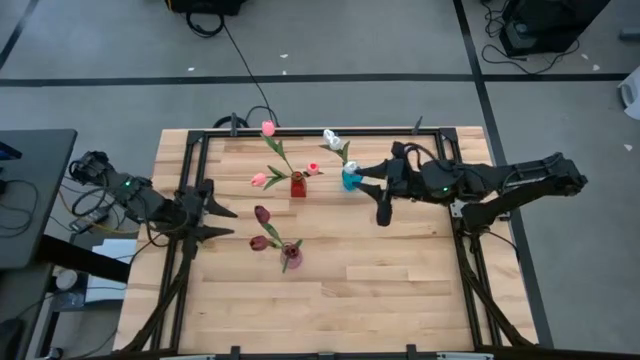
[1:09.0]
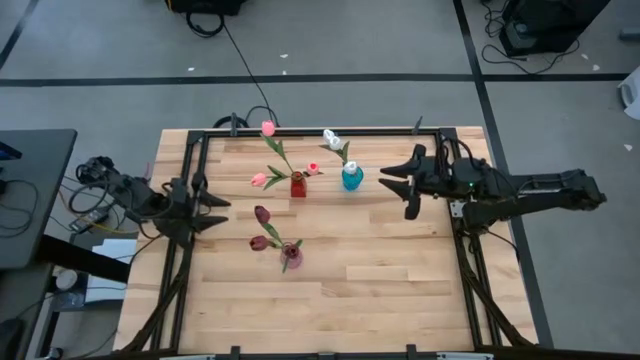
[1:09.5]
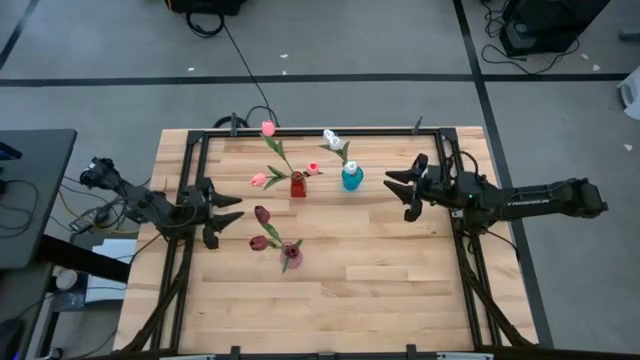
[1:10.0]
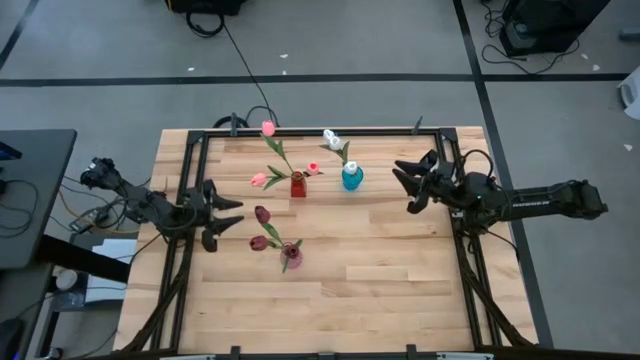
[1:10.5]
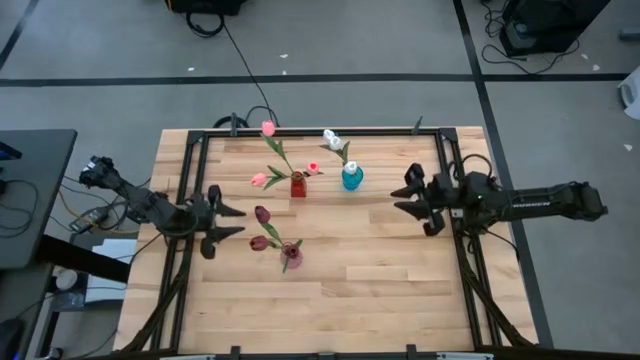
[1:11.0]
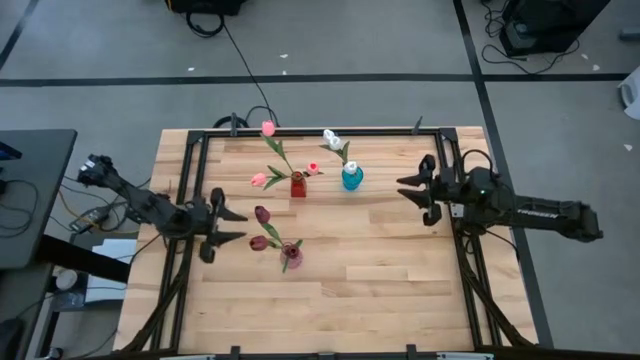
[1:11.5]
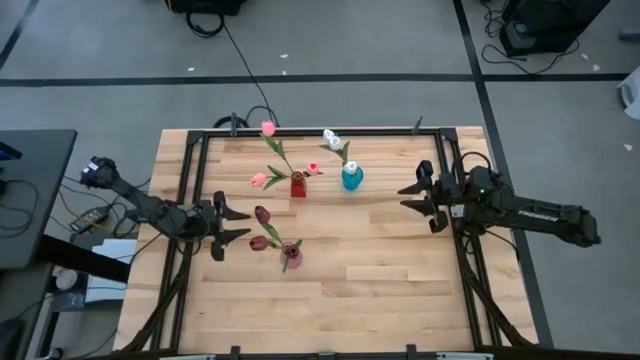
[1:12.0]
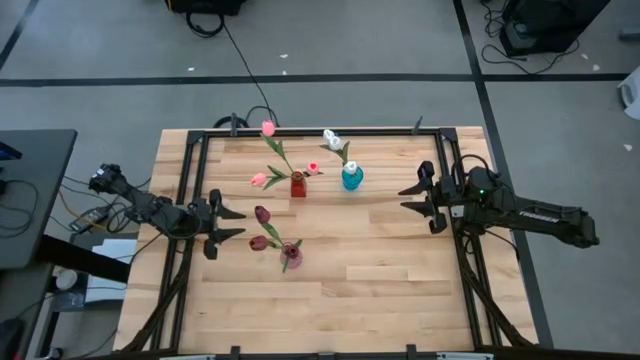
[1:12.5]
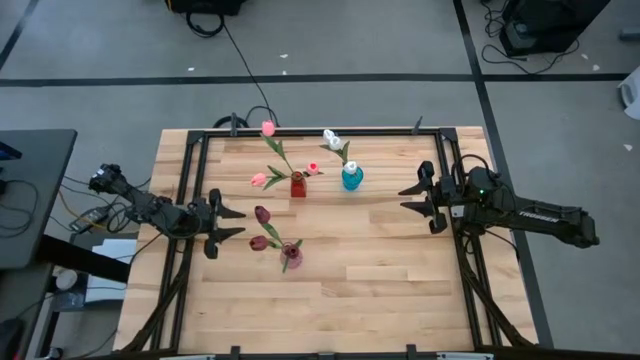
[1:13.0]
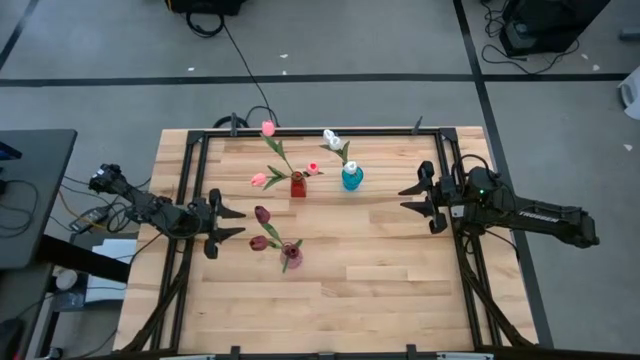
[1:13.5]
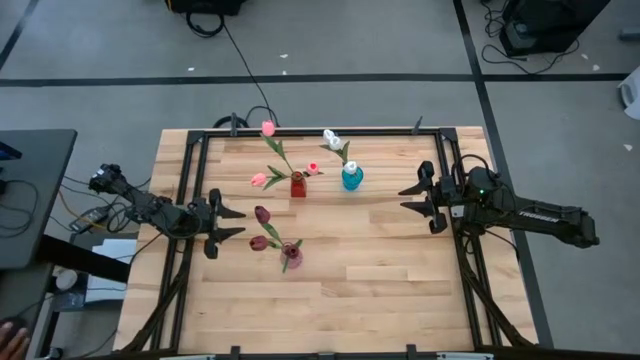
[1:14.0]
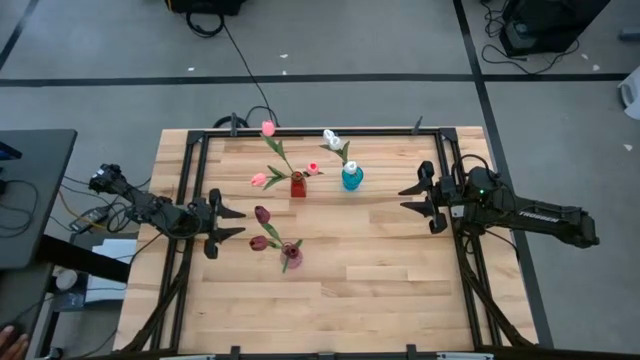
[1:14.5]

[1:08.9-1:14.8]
Task: Sort flowers into vase by color
Return to Home Position

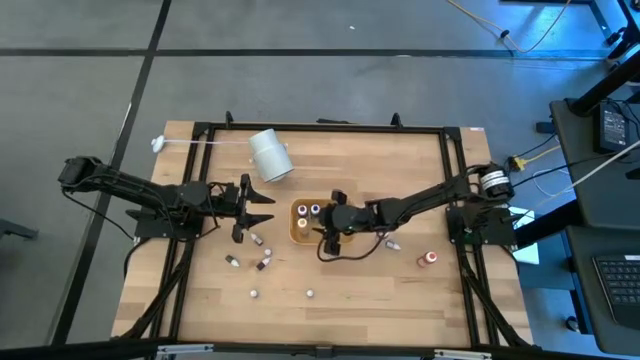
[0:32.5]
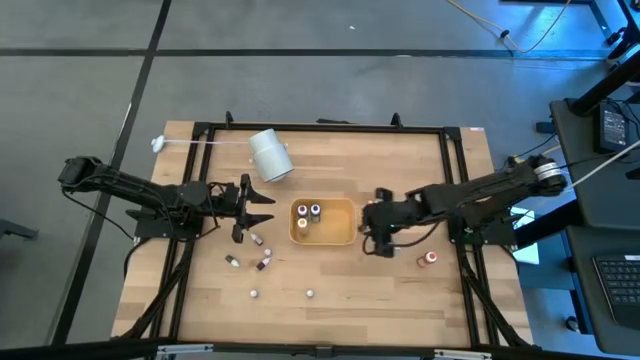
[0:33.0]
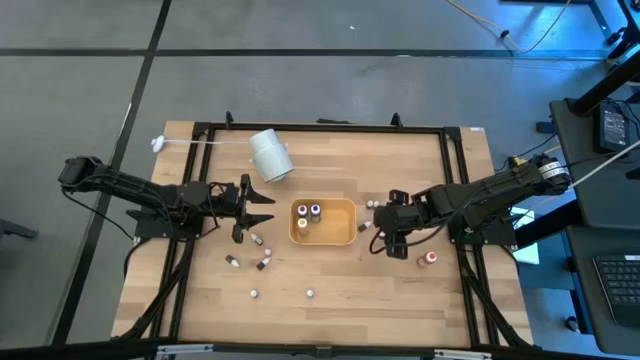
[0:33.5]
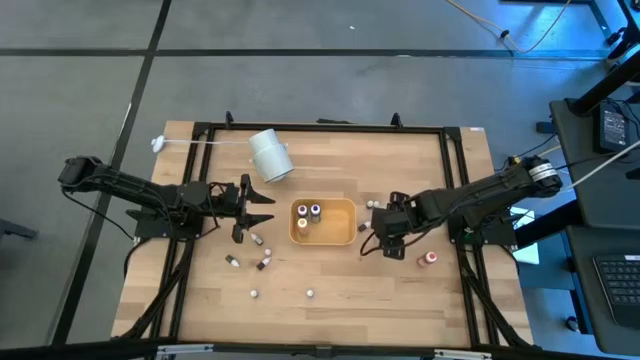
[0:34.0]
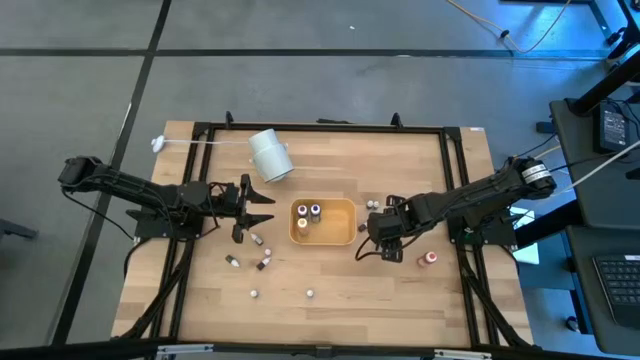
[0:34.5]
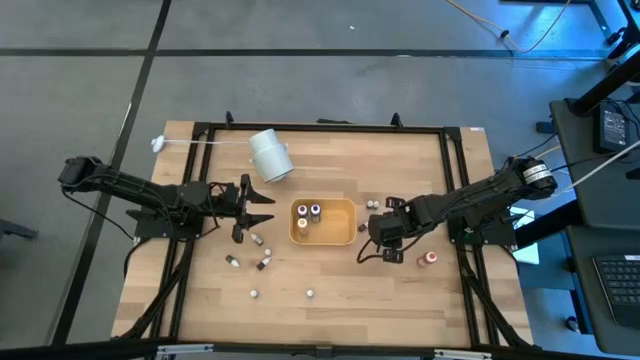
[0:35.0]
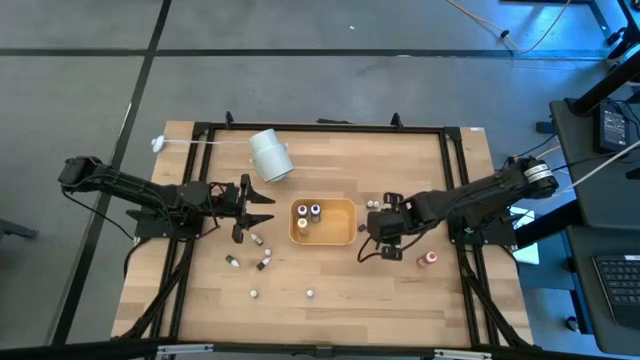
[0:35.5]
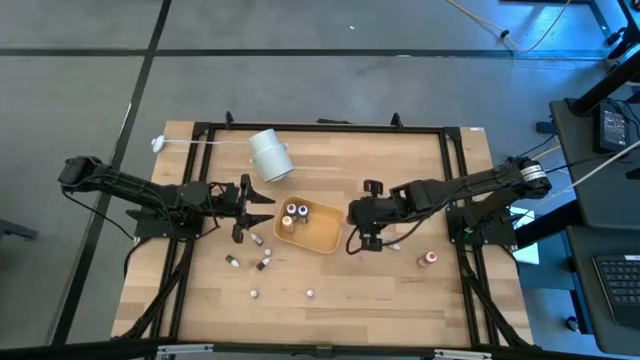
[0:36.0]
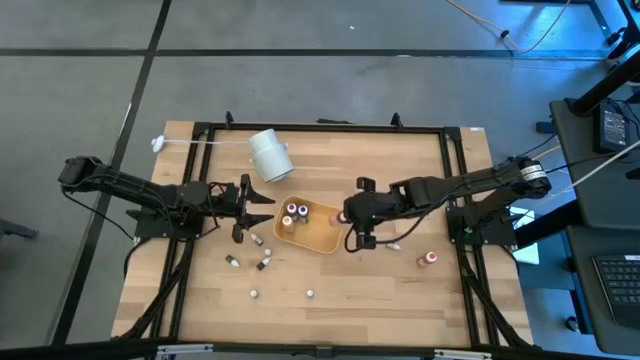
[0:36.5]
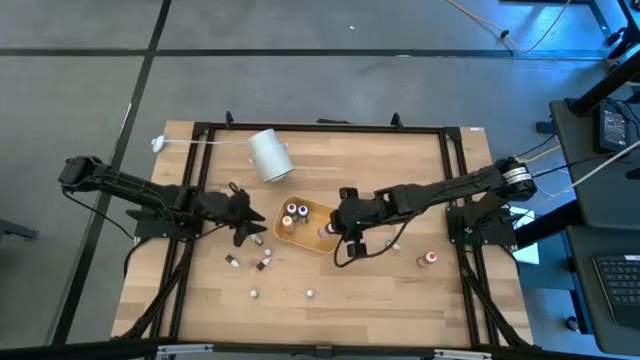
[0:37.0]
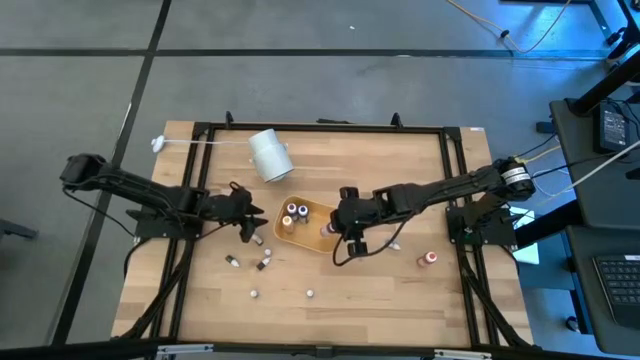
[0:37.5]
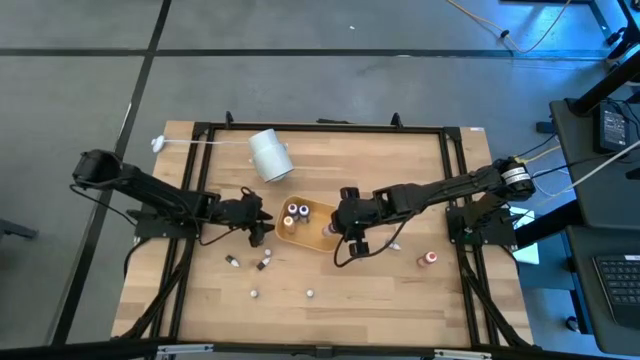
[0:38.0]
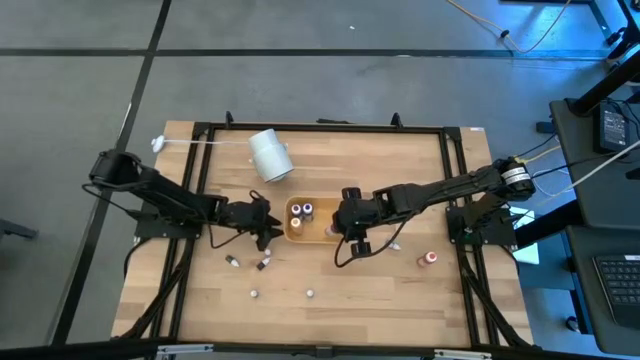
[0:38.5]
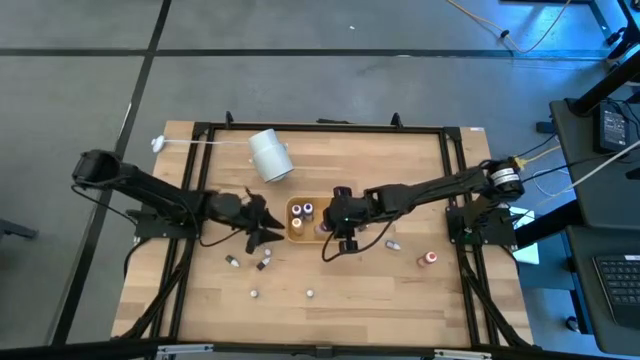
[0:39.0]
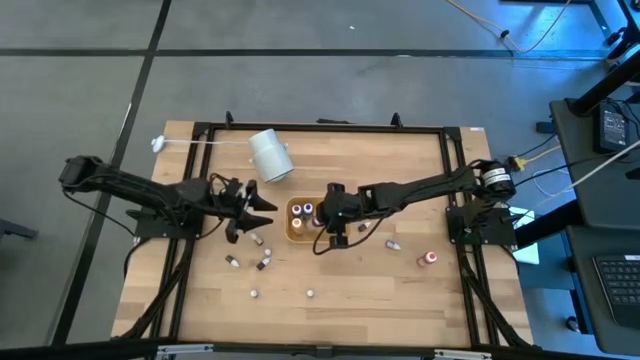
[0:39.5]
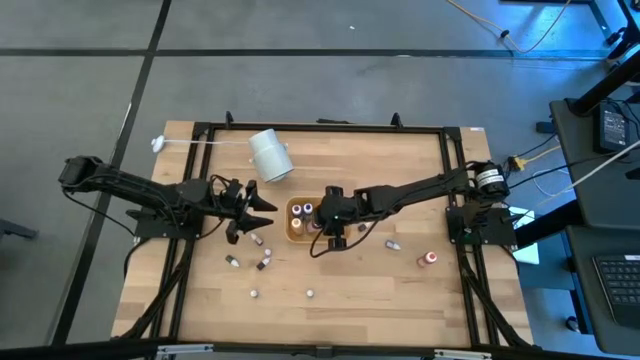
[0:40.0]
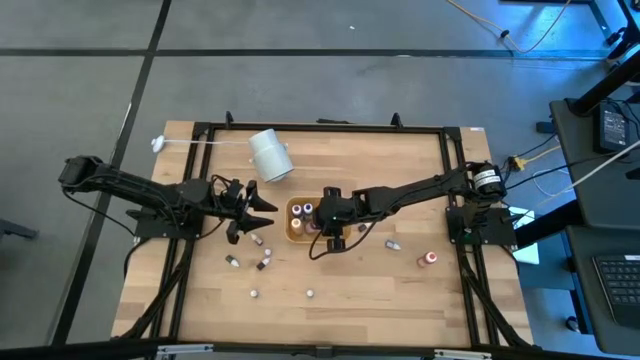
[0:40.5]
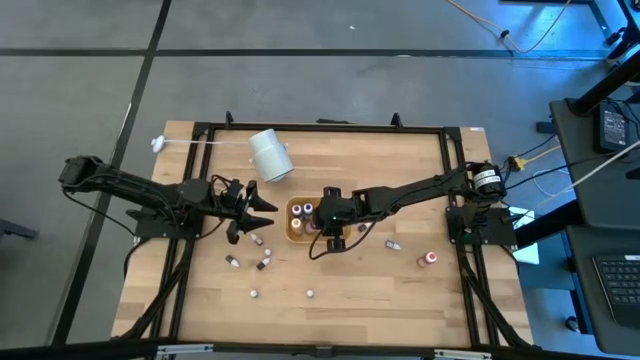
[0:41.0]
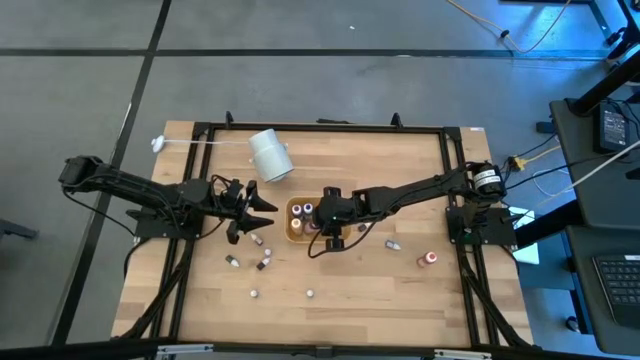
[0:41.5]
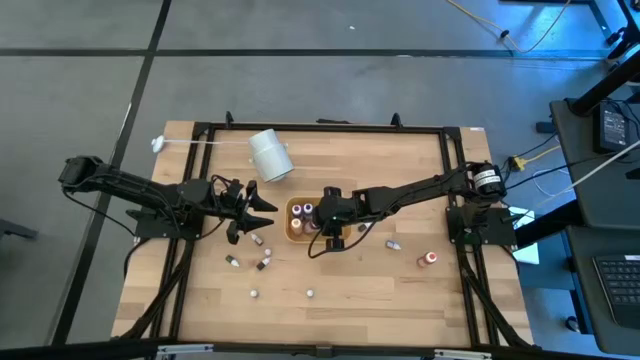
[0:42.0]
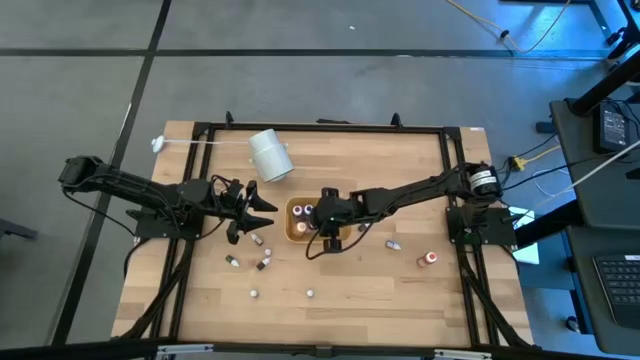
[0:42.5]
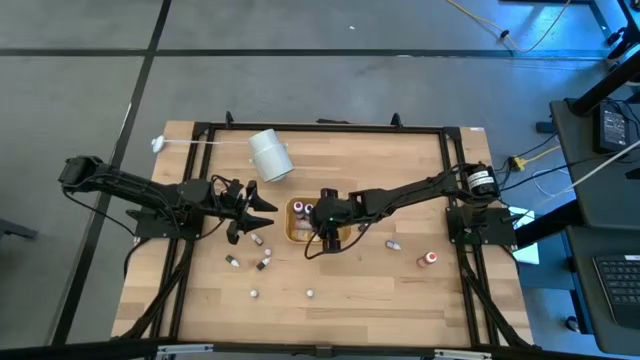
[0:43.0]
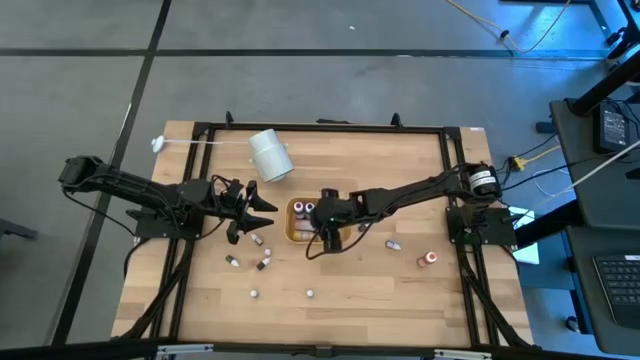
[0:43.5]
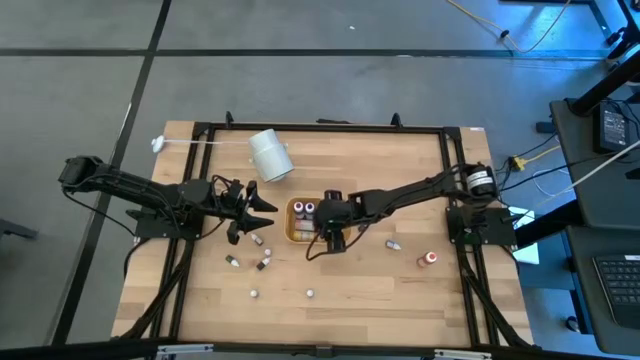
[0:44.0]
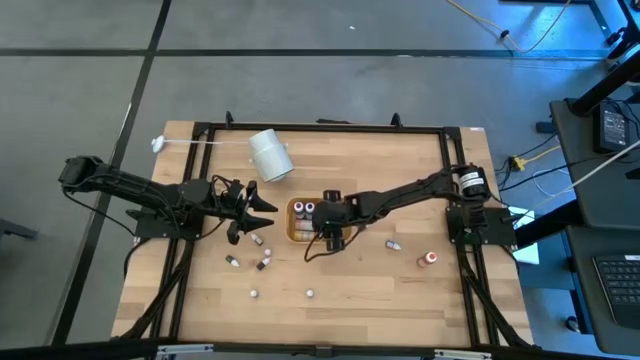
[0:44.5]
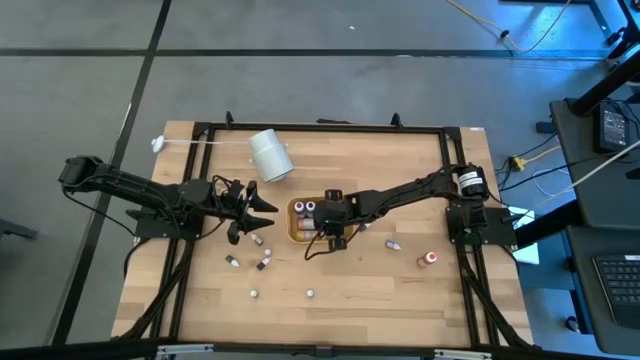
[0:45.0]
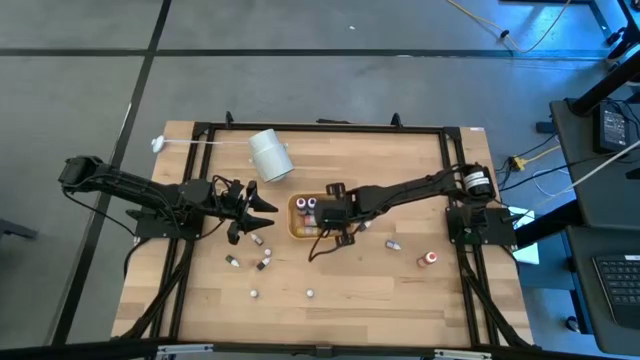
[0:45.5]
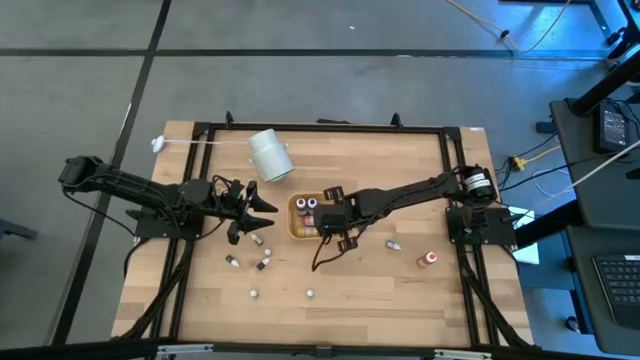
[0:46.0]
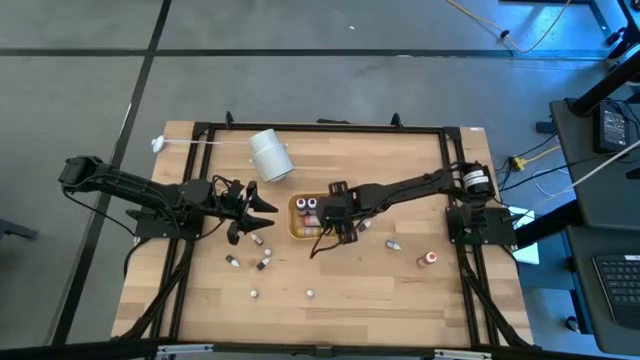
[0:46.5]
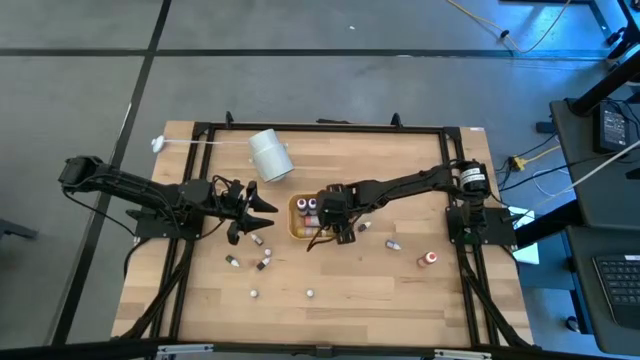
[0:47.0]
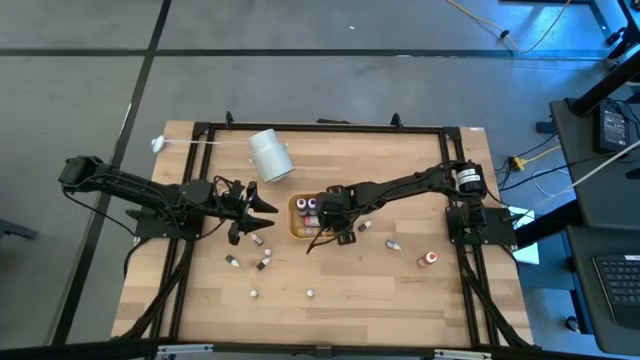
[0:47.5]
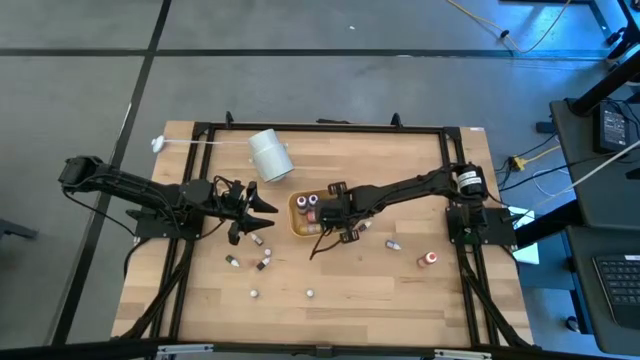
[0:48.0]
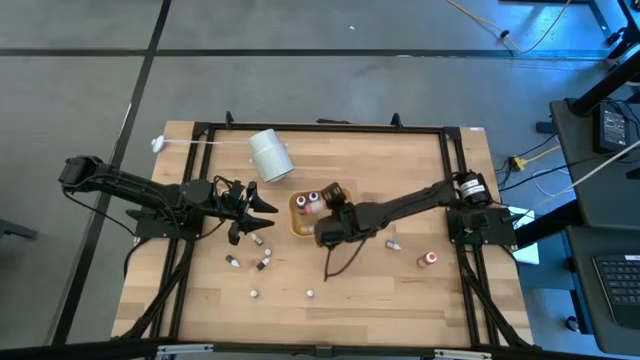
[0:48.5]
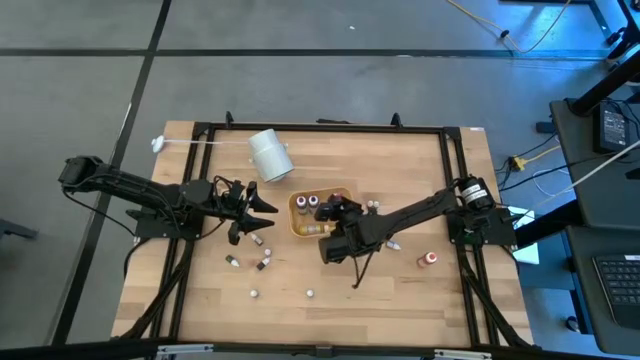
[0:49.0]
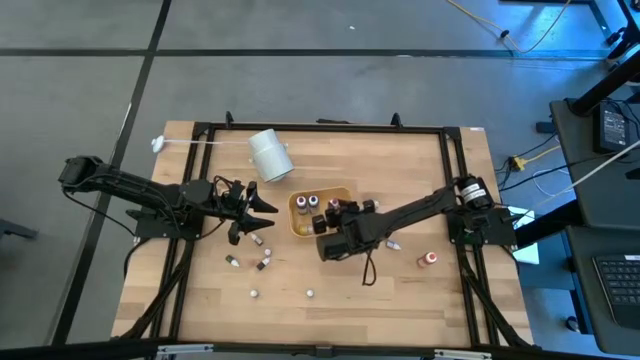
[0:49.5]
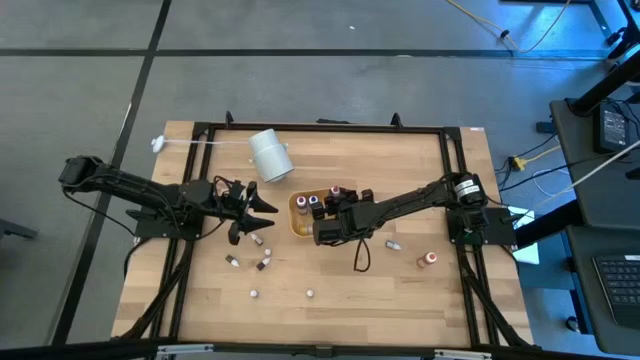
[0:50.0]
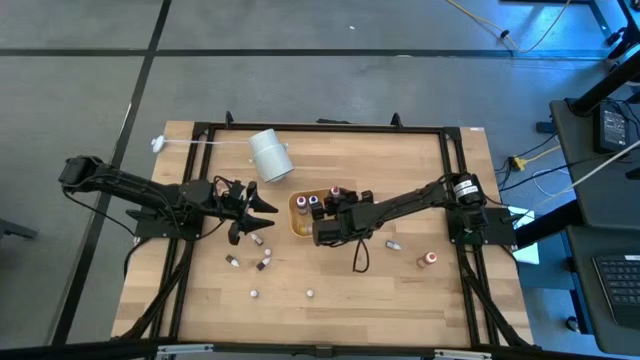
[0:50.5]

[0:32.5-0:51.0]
Task: Pick & Place food coloring
Put the large red ink bottle into the yellow bin
